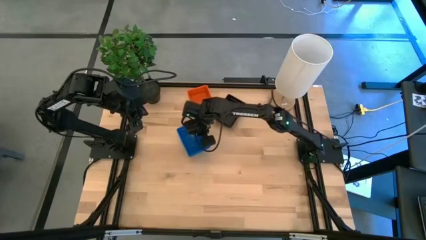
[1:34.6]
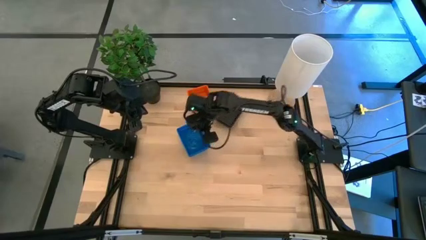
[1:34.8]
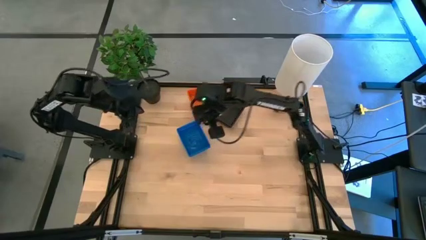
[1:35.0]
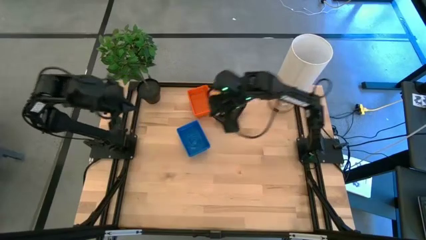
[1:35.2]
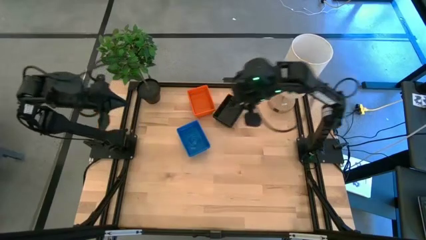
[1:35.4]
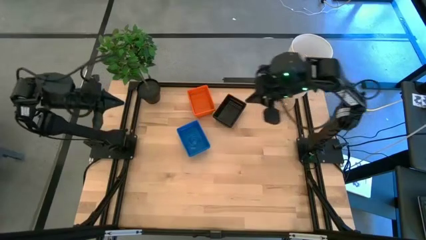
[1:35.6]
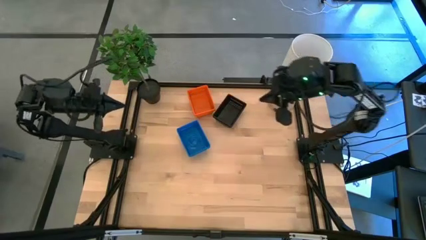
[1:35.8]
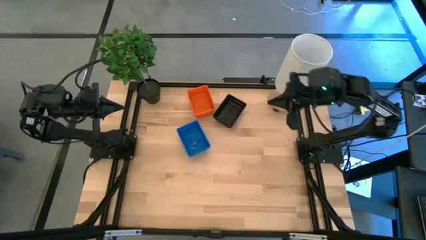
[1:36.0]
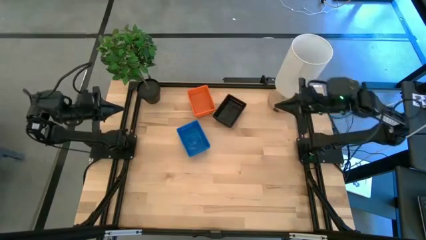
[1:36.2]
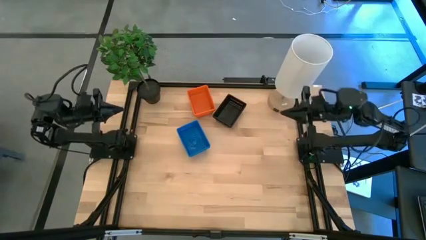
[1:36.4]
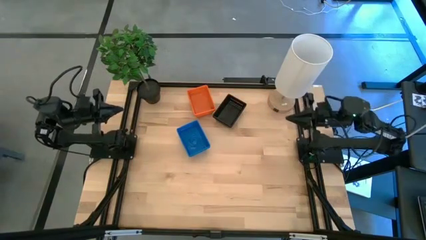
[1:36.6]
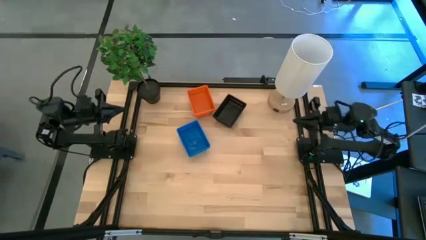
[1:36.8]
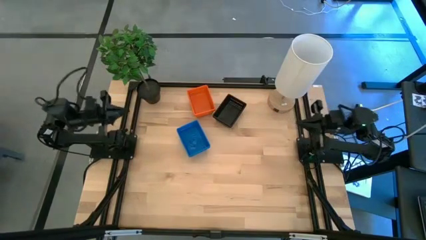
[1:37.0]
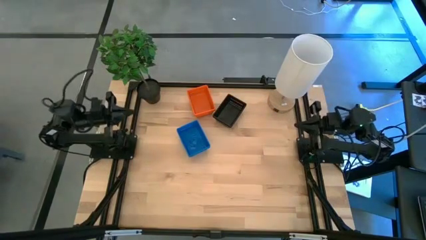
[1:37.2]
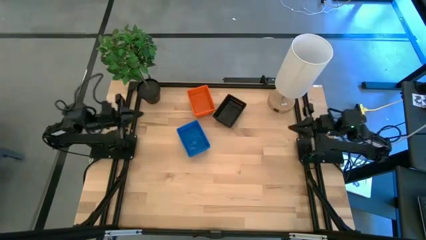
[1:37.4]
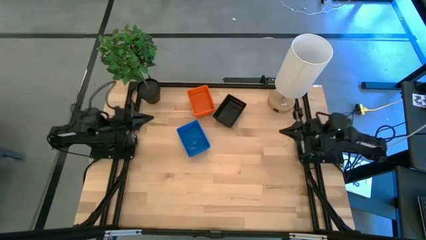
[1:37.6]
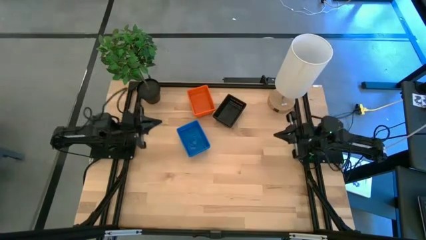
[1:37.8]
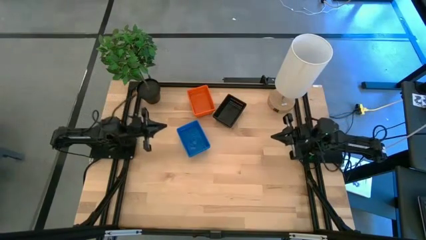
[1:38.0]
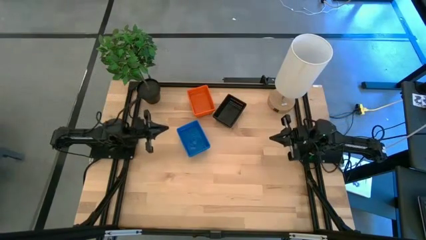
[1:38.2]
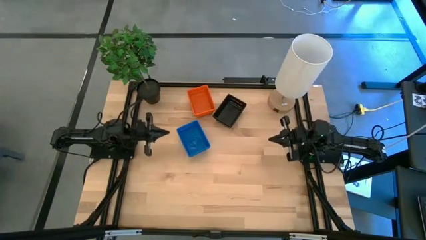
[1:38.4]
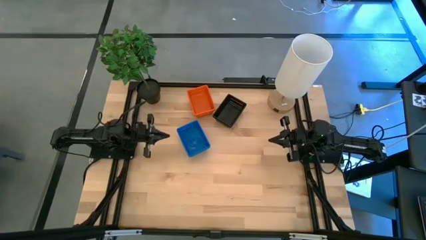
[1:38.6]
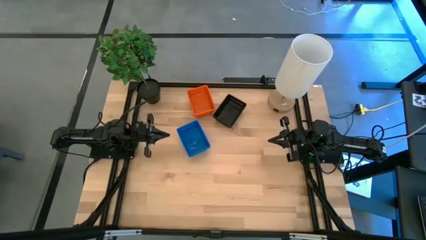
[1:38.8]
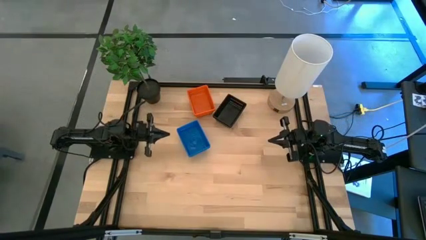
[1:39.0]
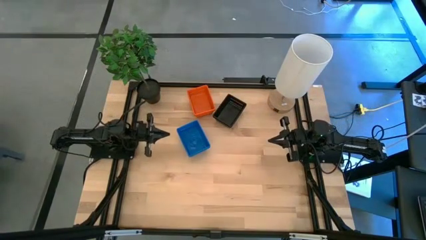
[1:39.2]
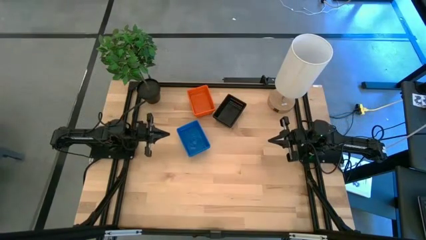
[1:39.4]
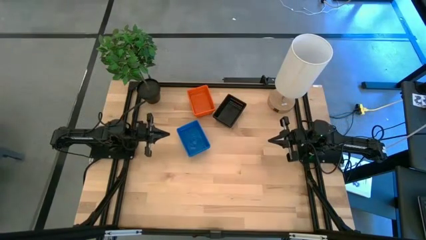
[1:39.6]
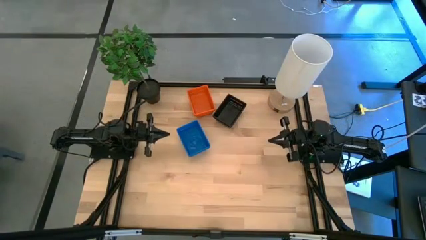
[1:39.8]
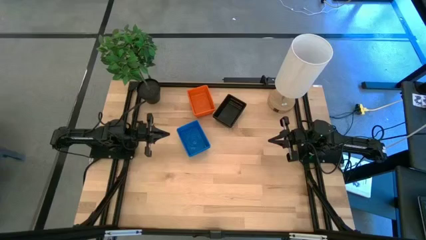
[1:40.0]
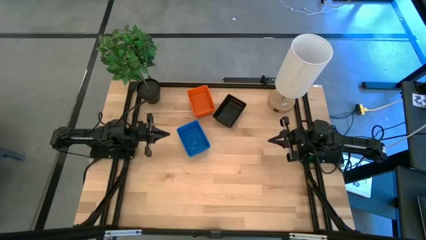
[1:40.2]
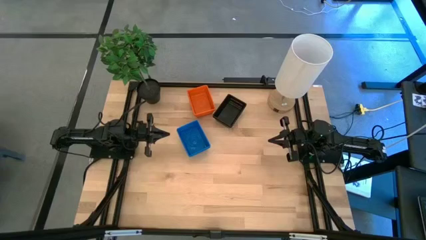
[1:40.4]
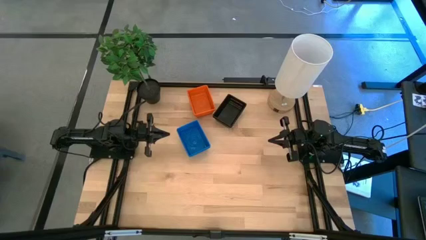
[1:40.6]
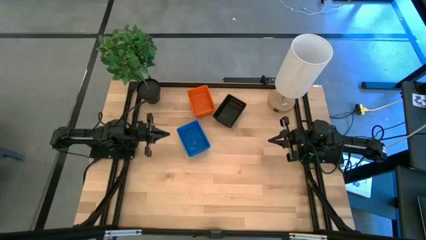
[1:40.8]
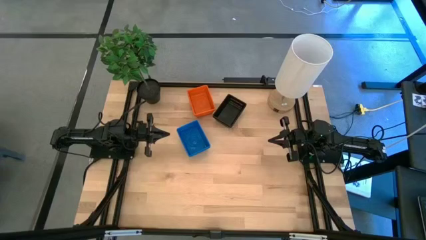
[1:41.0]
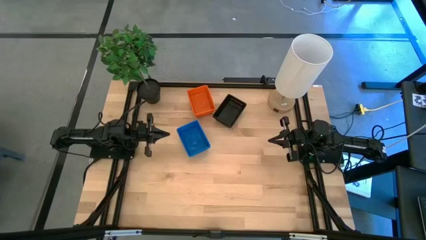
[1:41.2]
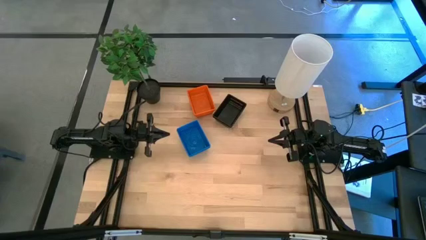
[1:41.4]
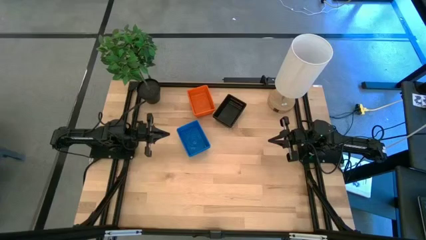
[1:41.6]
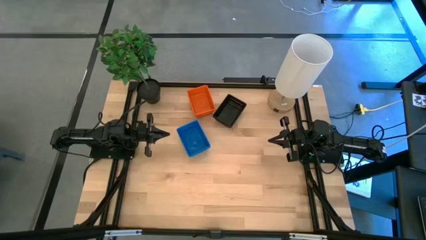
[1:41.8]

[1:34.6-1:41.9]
Return to Home Position
